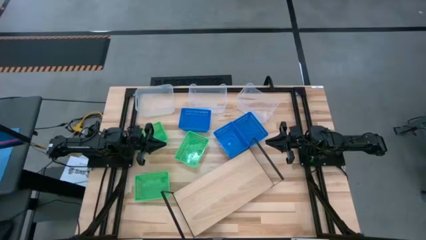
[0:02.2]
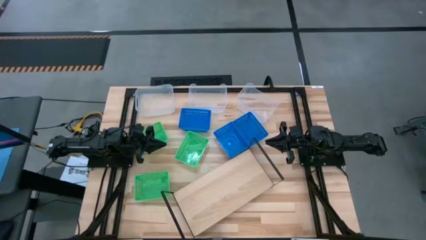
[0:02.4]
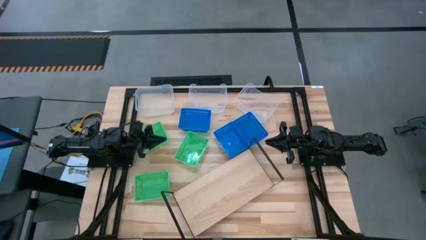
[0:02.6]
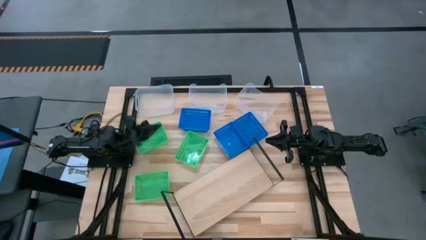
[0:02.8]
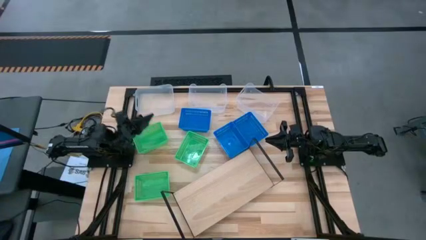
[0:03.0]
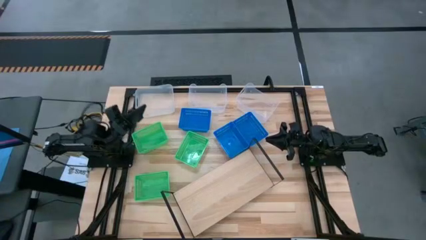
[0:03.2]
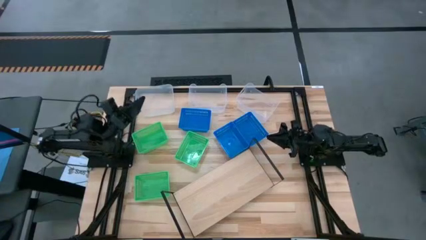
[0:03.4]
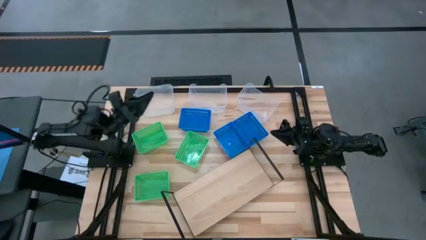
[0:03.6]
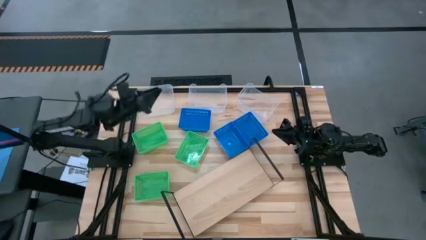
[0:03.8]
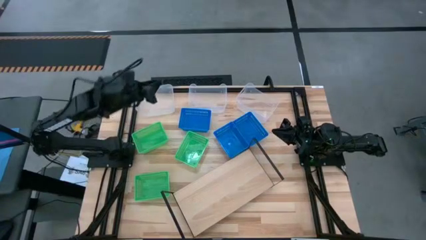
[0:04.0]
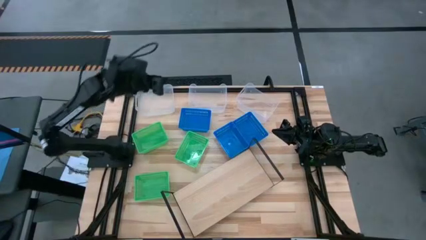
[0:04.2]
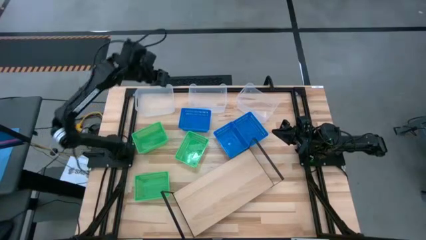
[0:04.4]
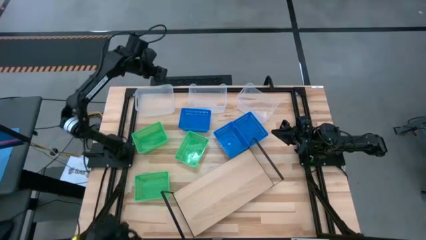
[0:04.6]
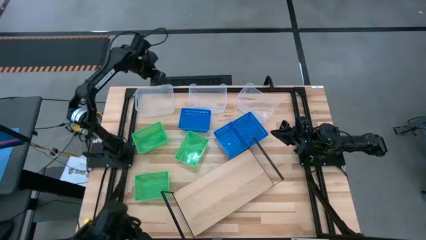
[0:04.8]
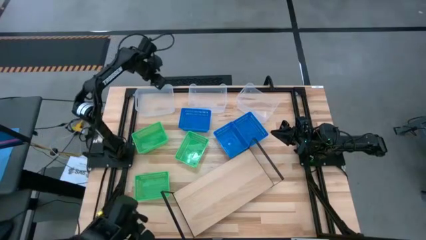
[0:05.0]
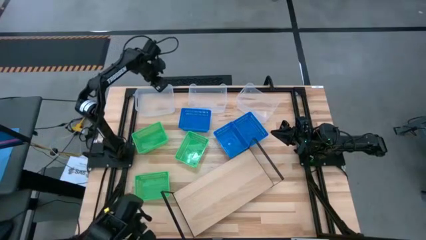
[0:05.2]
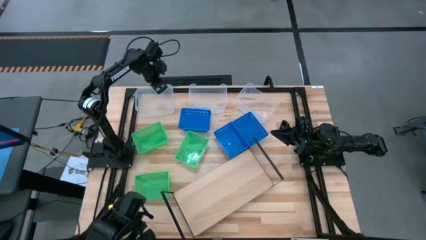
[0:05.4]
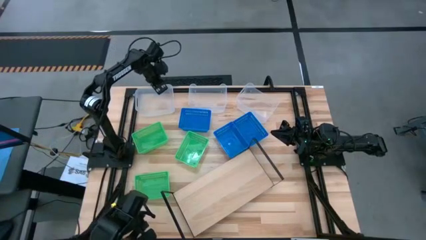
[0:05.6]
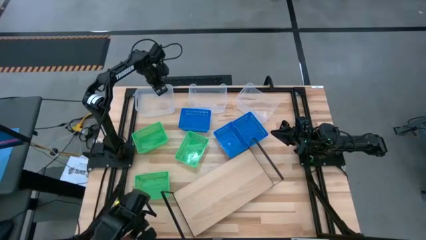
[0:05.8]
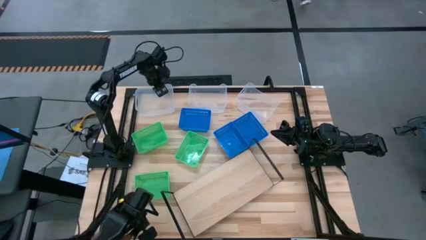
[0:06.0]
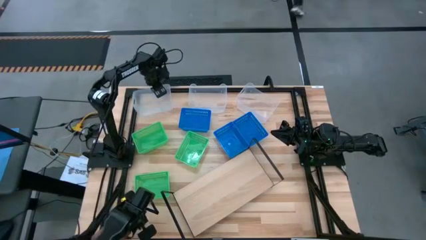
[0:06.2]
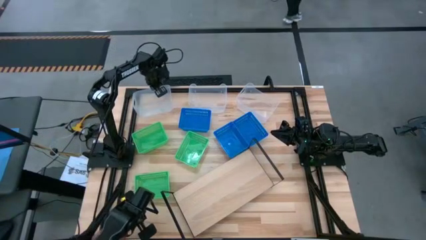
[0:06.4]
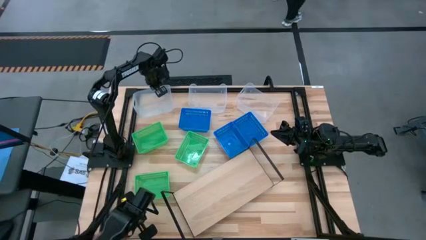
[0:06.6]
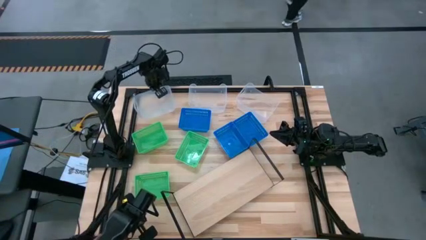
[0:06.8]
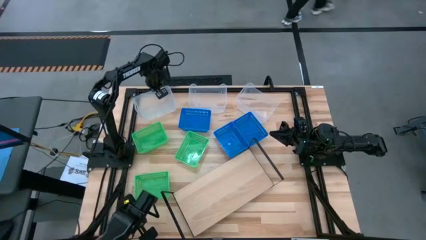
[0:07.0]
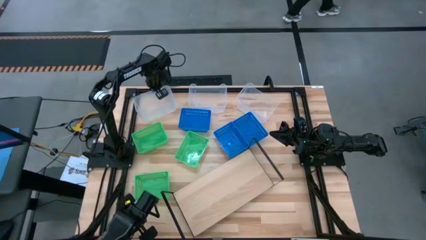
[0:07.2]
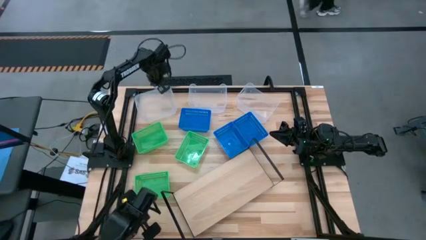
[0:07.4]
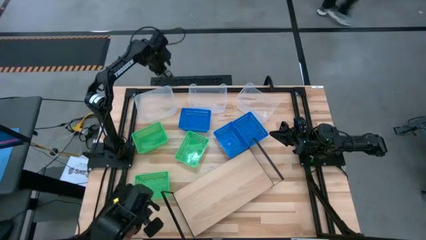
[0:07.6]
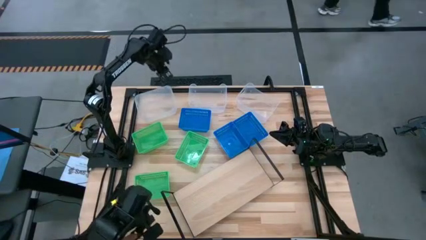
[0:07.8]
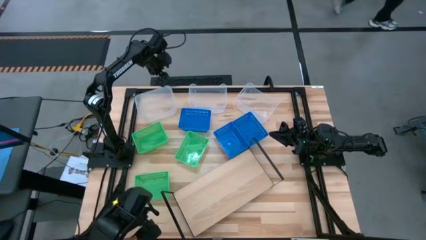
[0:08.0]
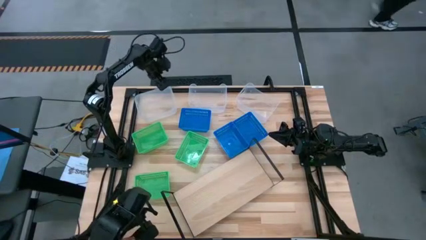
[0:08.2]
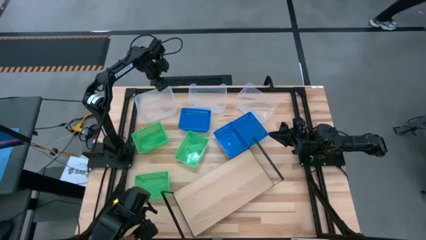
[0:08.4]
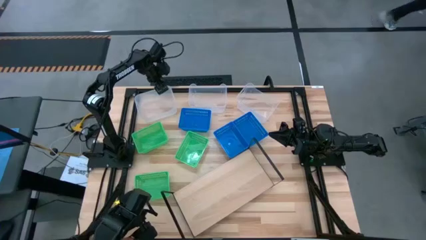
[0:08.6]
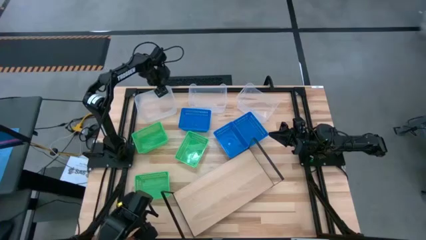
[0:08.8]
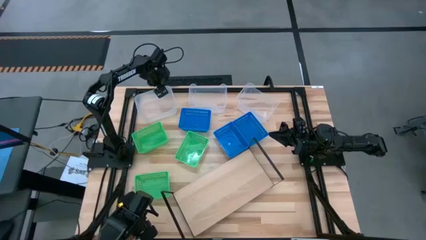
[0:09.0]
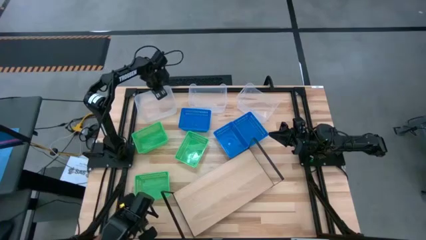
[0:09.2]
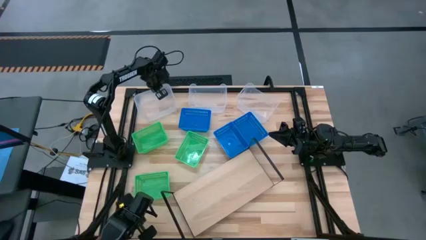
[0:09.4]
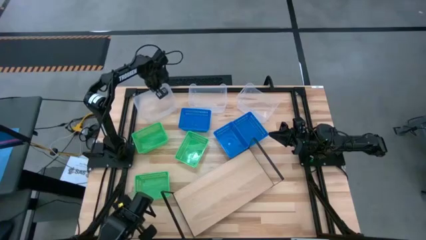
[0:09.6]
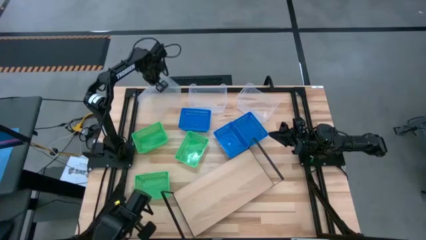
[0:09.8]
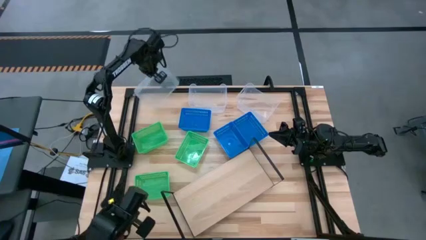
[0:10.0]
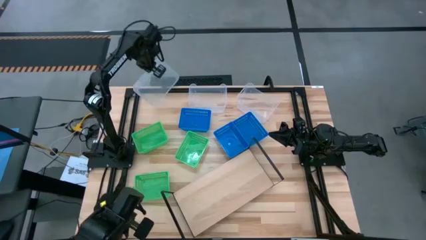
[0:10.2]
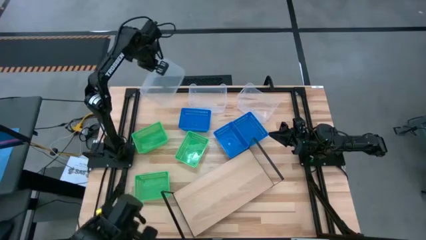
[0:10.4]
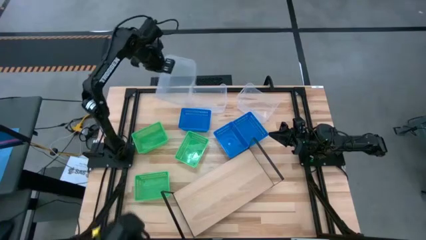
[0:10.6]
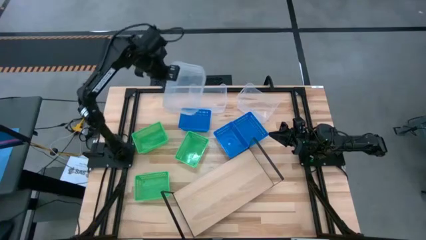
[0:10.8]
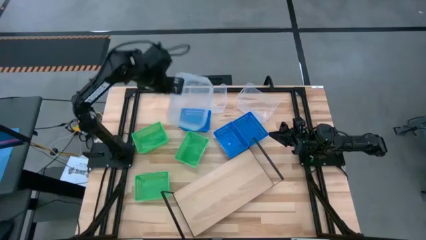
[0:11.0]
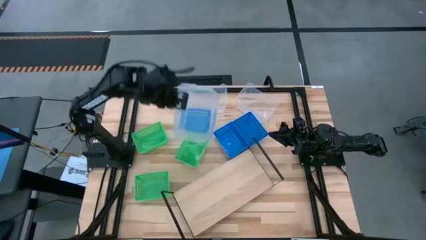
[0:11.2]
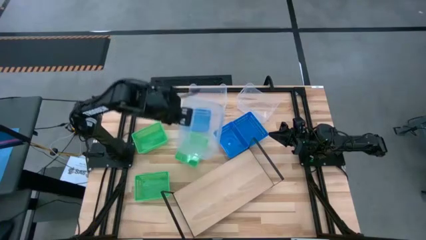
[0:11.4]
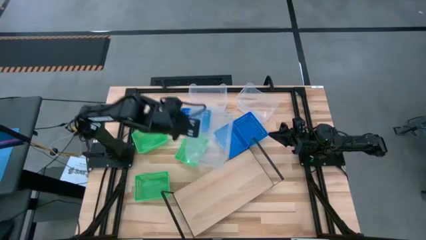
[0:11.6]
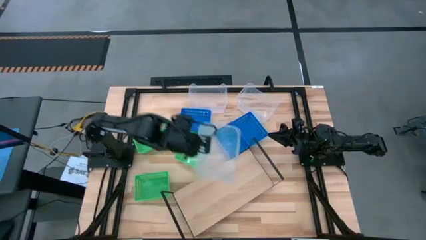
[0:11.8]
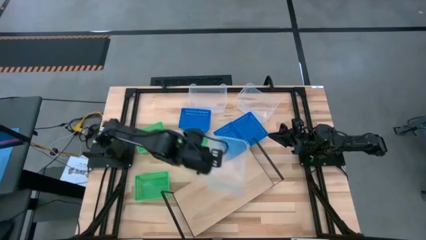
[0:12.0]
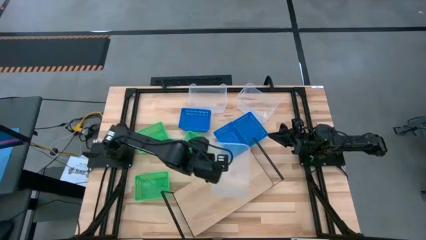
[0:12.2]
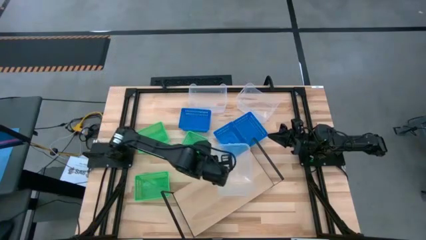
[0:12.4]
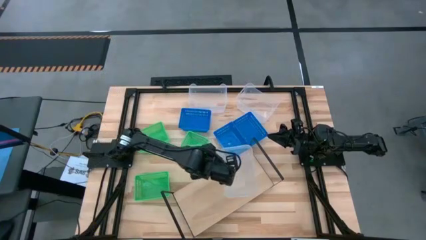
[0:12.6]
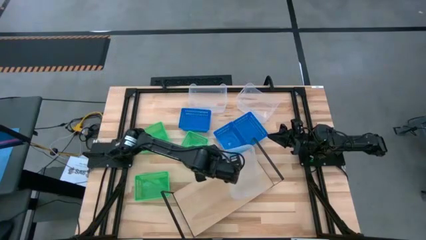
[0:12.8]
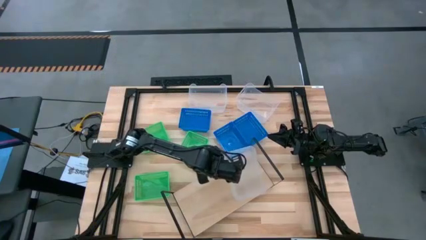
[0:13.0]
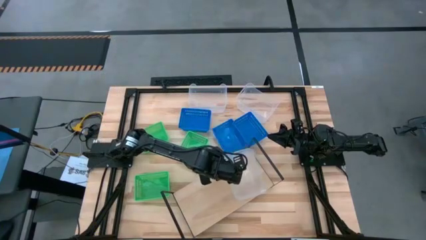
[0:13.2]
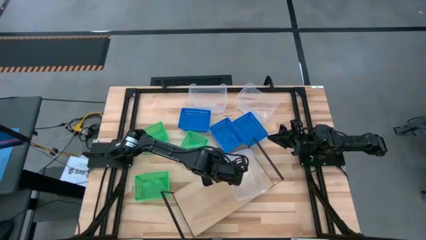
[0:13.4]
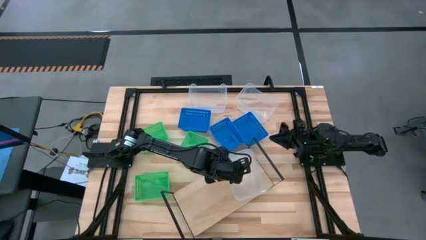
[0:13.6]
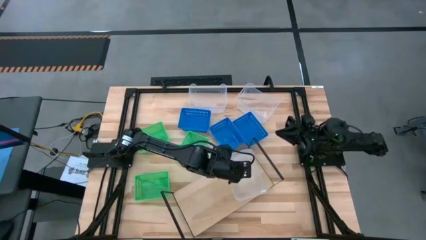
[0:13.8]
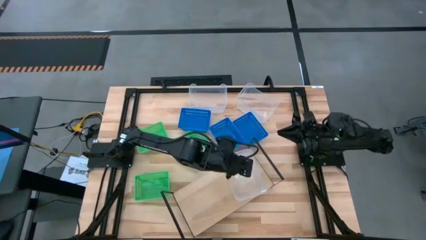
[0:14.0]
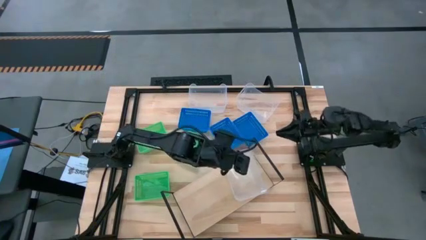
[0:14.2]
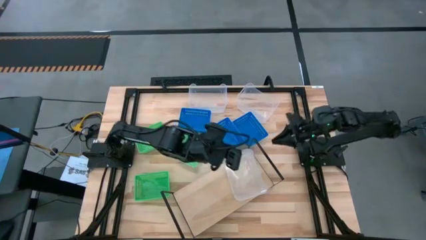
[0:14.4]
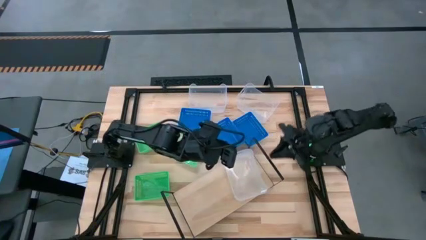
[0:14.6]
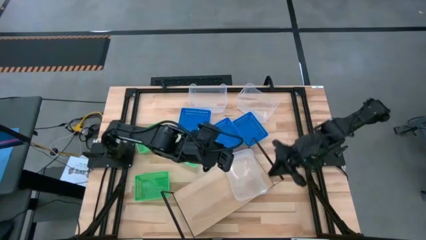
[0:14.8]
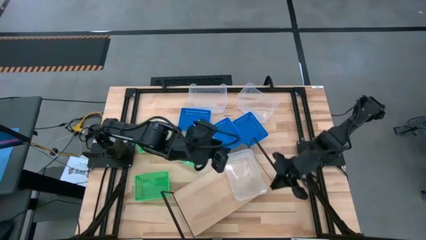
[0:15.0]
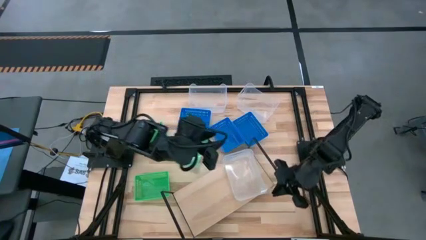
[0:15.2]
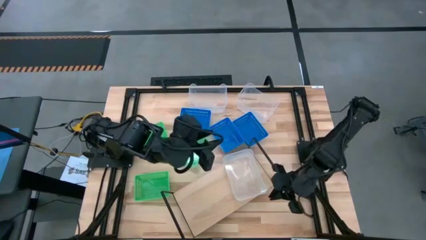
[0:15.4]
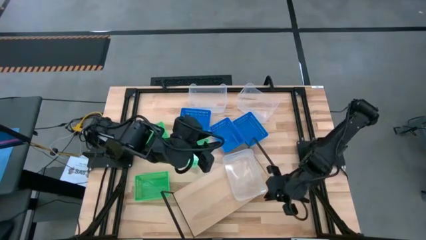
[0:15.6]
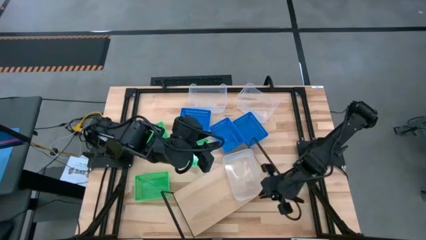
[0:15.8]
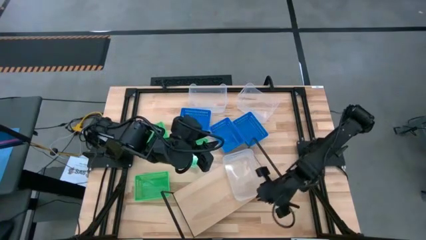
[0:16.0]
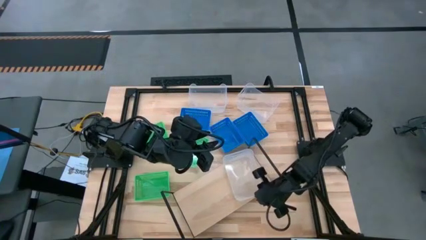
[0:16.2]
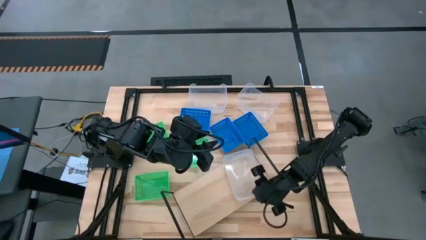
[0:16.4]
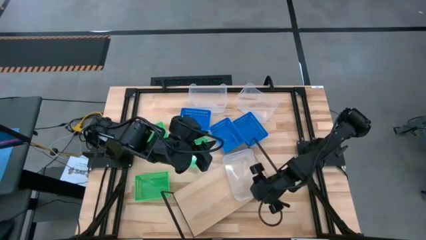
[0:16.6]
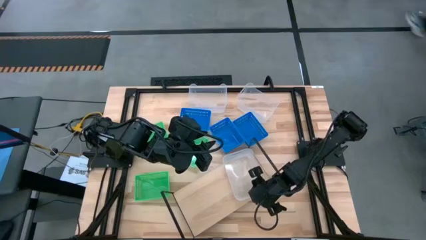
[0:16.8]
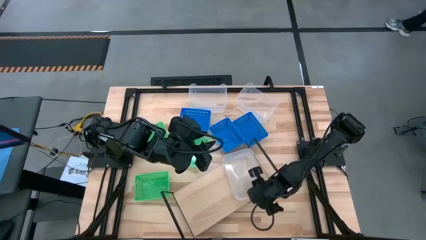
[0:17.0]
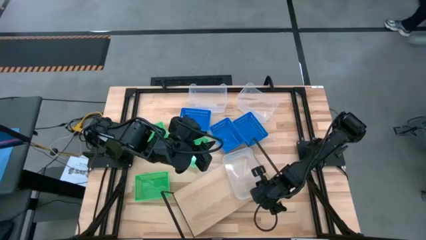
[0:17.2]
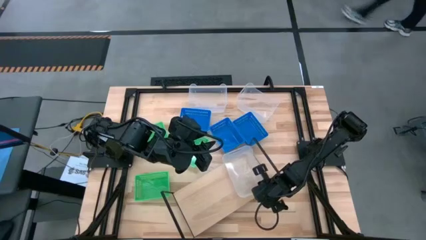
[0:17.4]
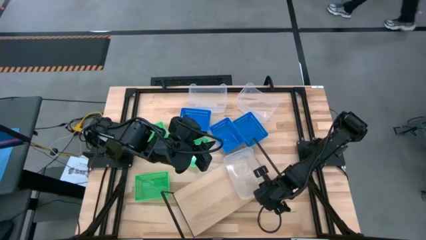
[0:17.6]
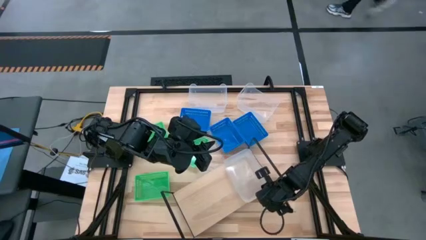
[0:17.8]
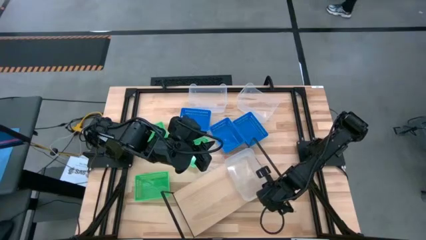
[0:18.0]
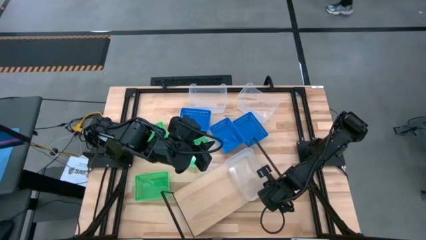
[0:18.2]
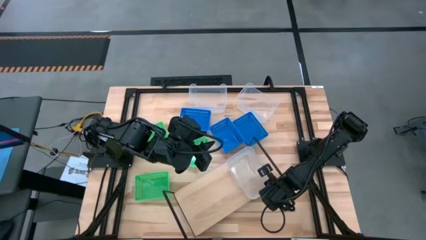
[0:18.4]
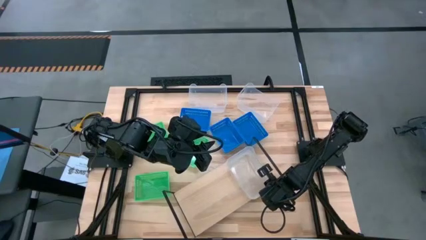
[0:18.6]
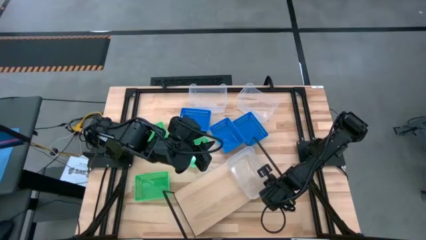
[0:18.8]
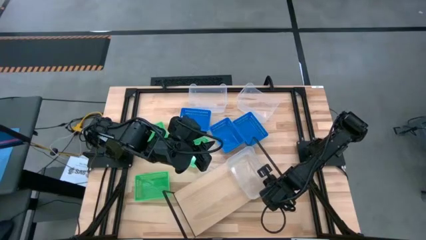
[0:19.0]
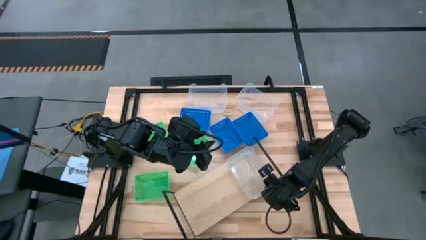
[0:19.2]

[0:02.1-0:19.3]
Task: Stack baskets on shelf by color
Put the left transparent bin on the shelf
